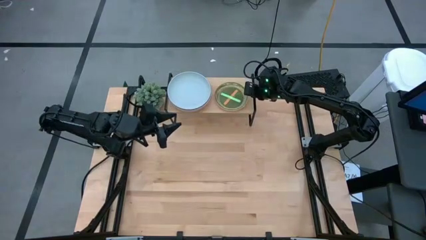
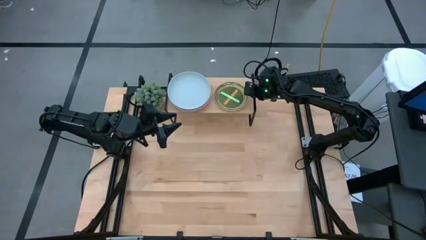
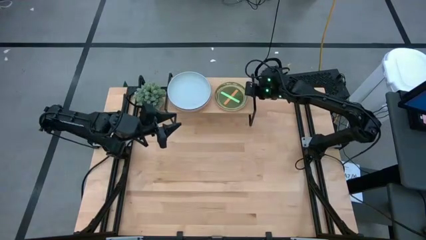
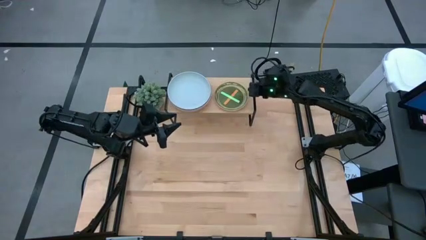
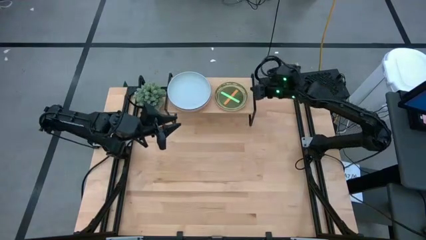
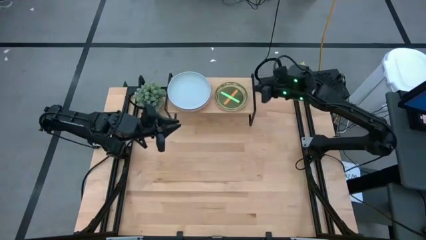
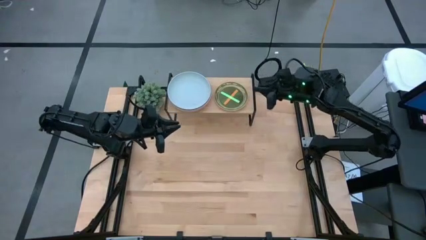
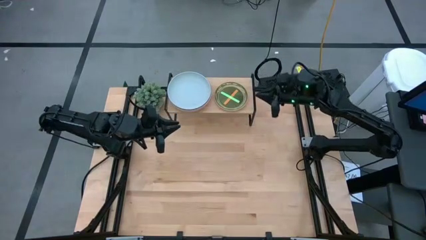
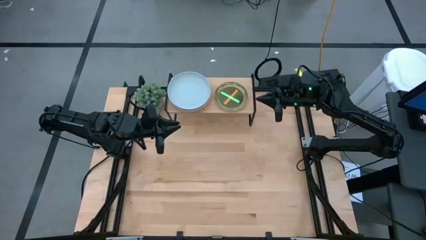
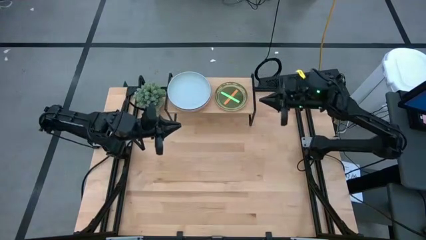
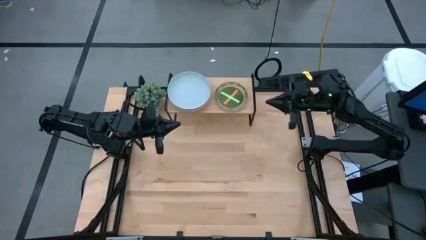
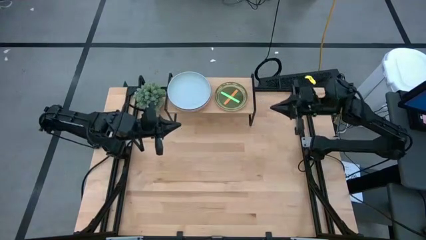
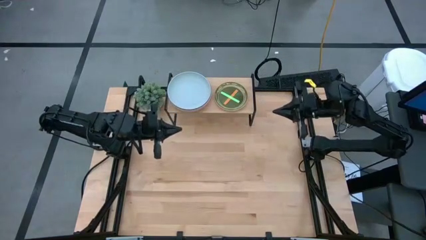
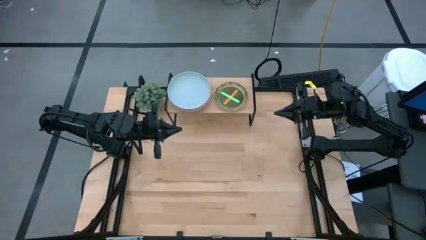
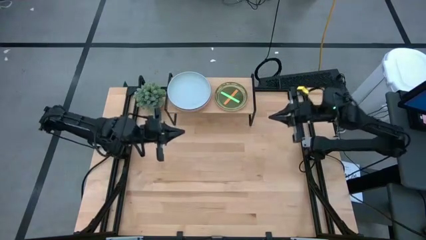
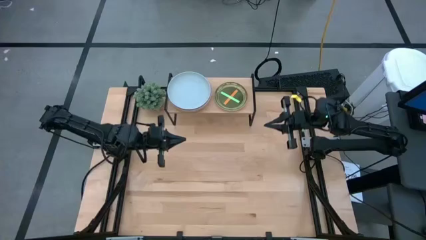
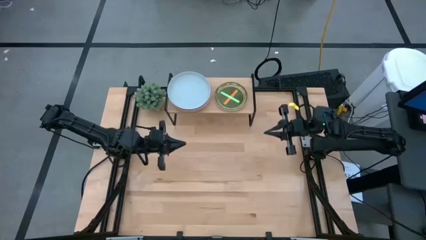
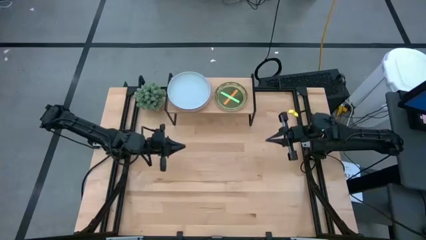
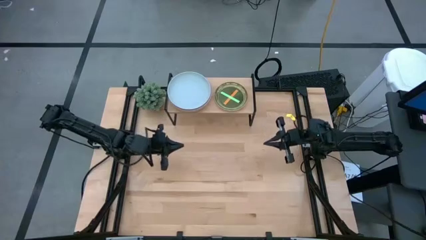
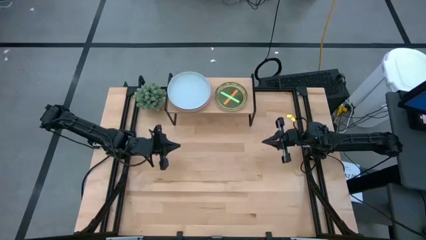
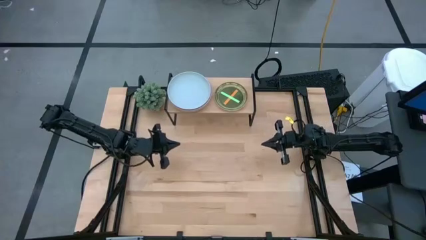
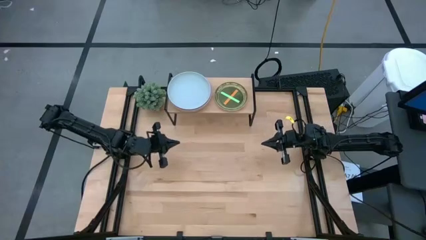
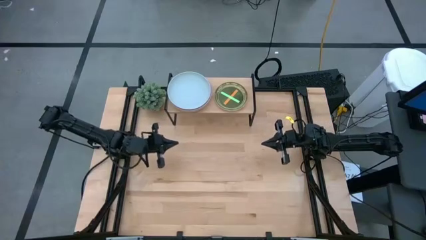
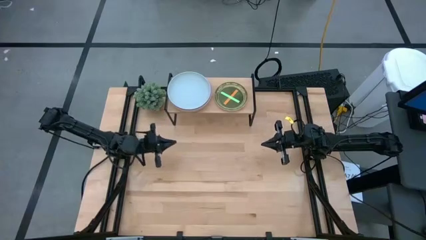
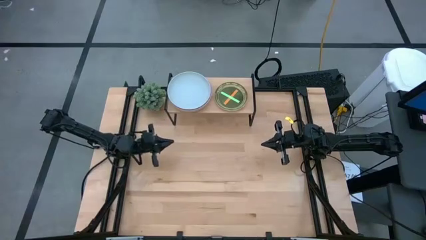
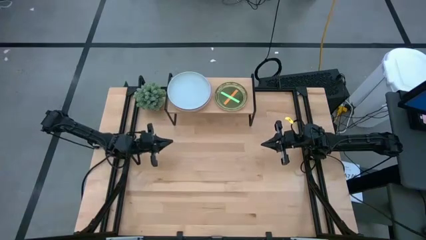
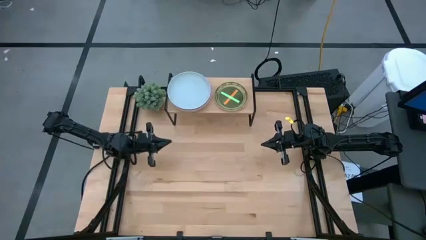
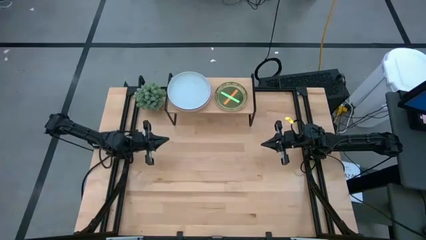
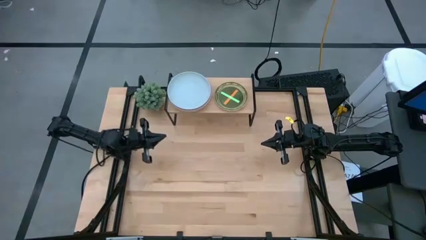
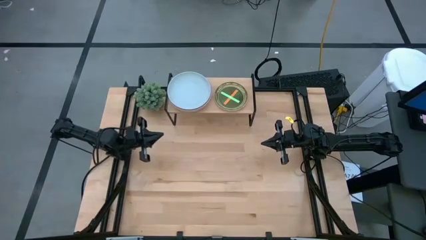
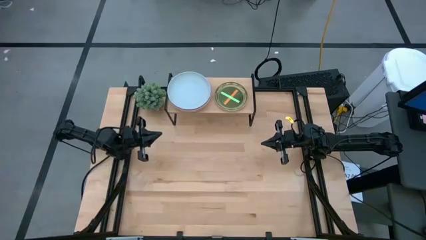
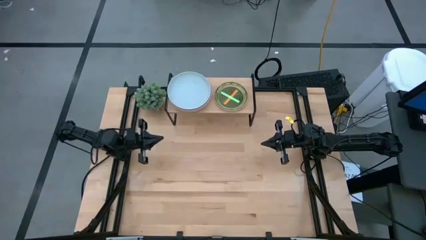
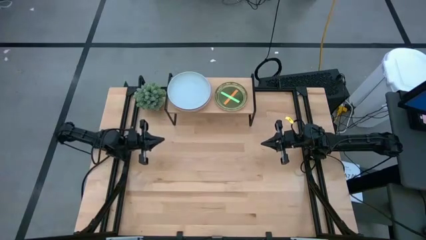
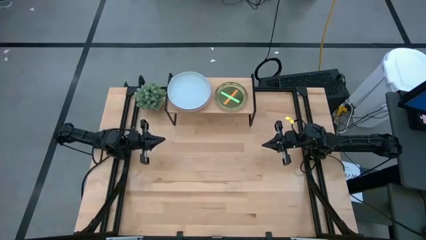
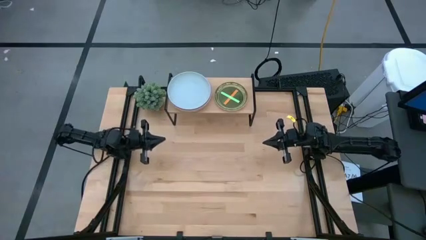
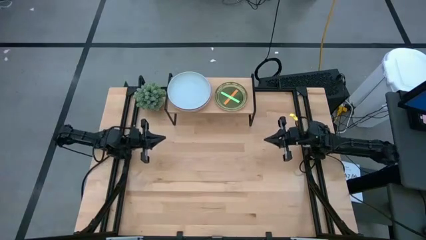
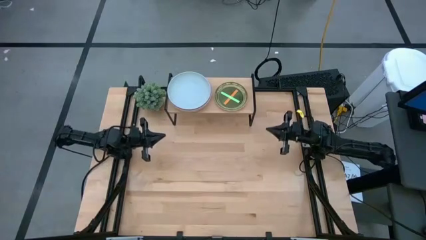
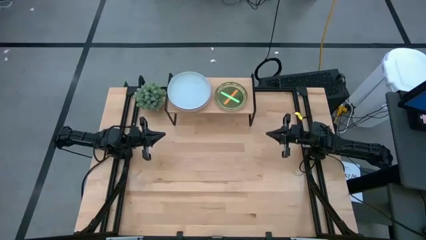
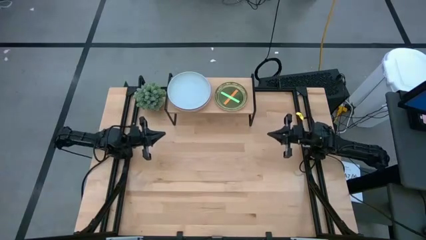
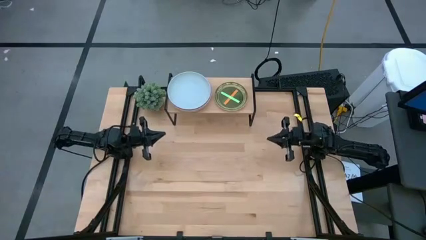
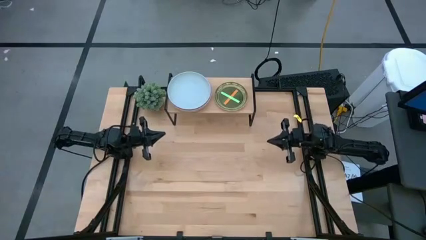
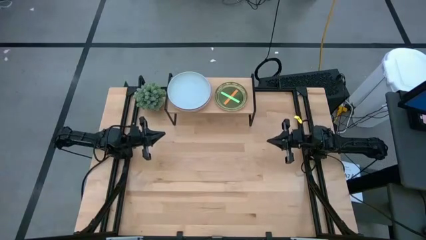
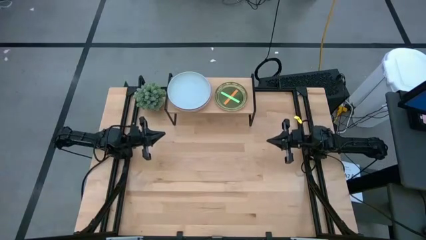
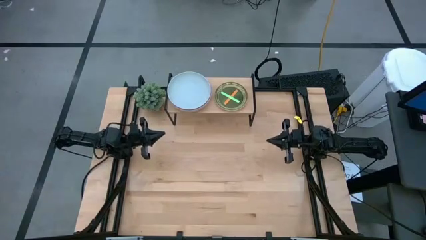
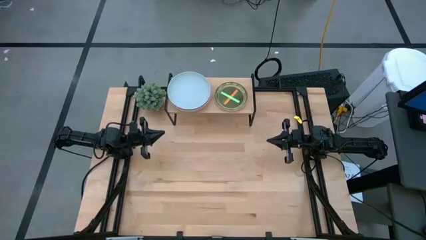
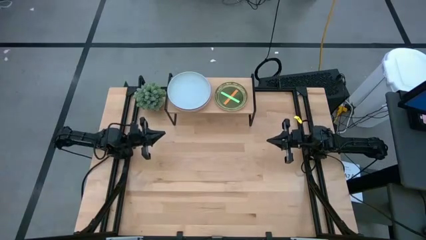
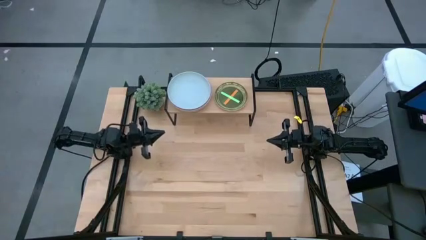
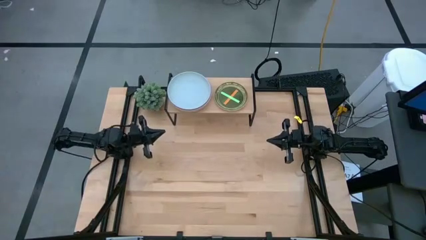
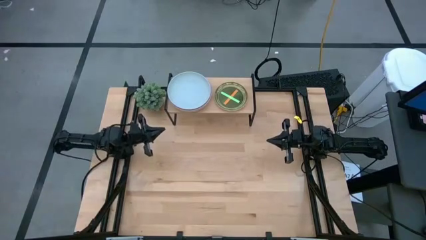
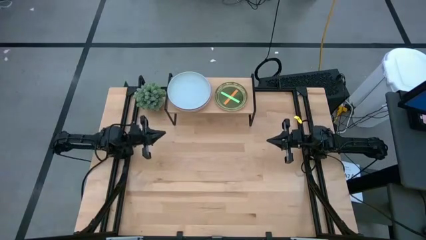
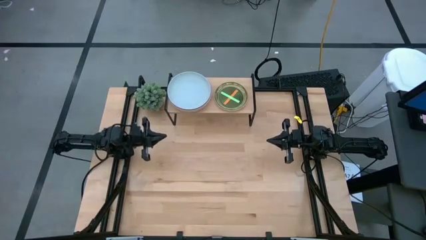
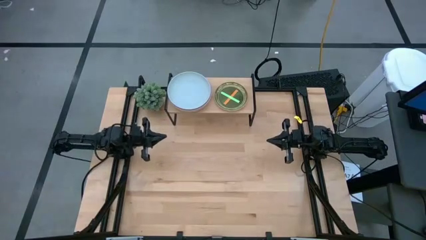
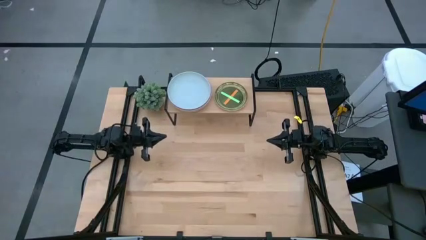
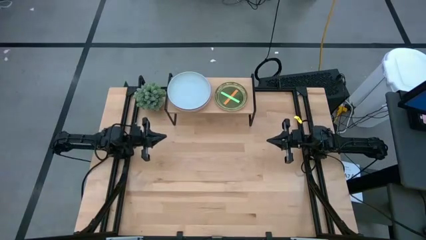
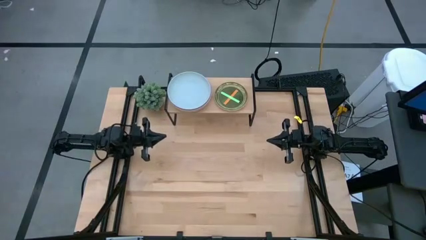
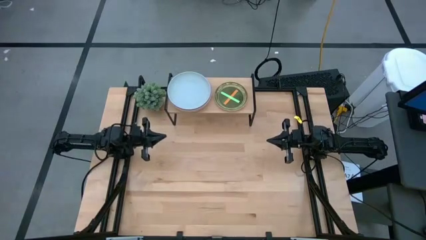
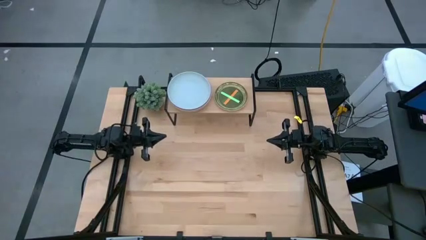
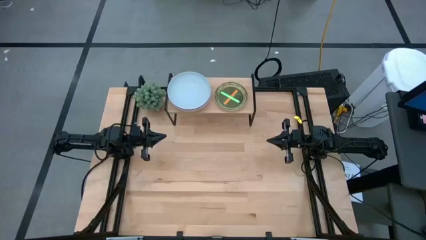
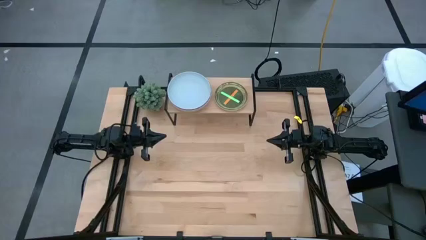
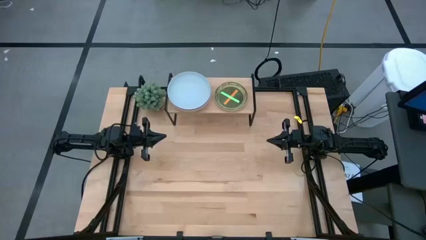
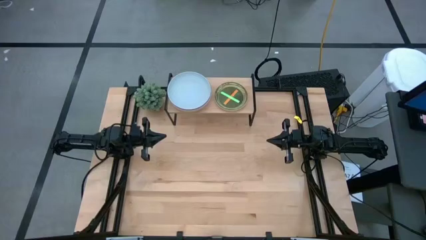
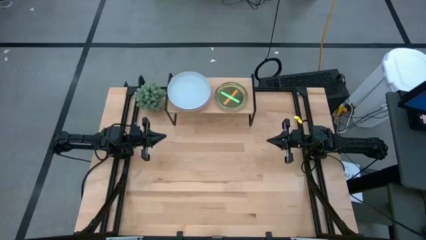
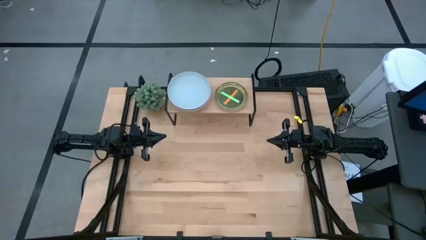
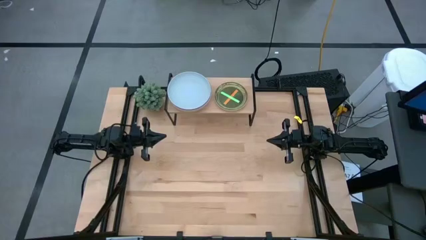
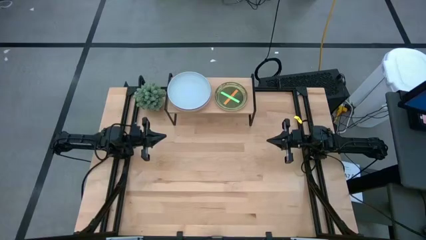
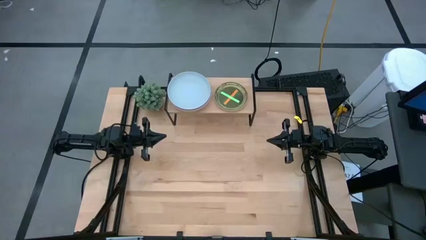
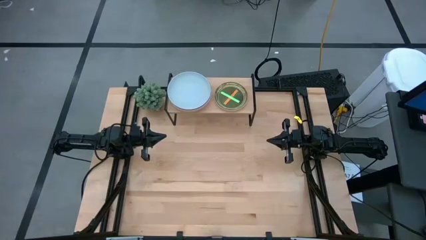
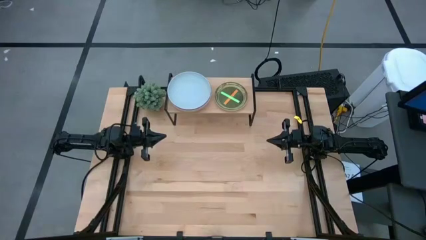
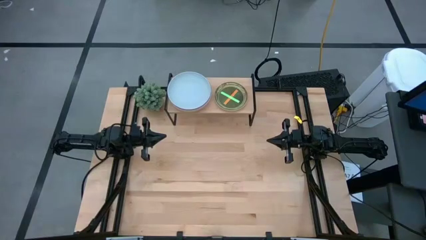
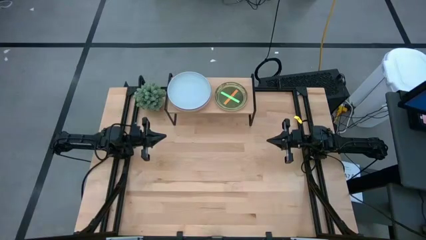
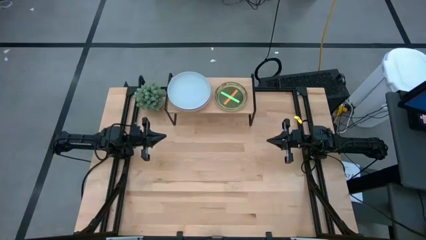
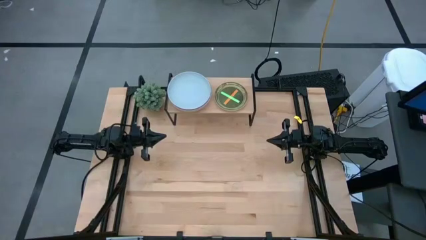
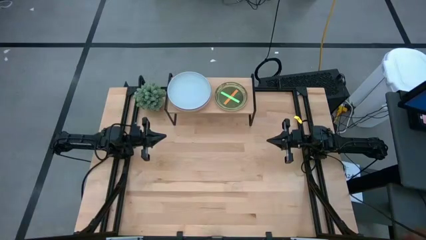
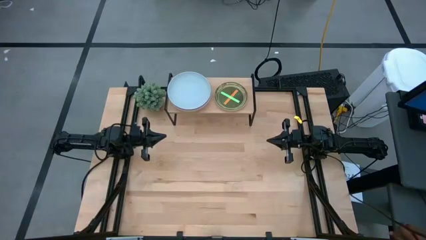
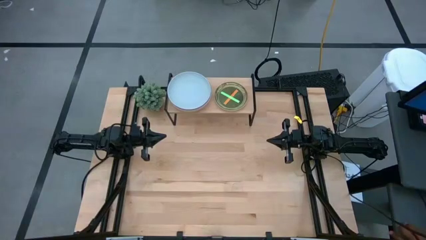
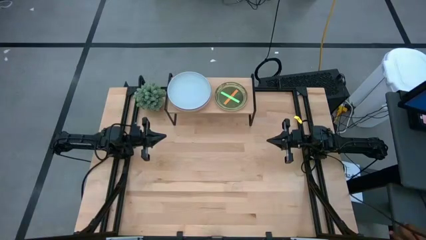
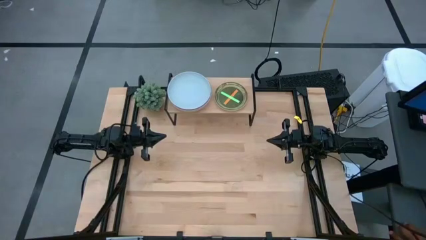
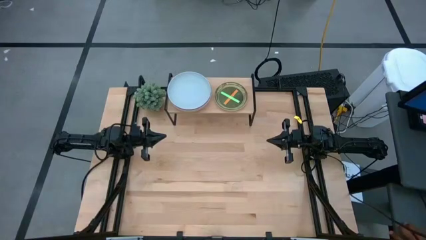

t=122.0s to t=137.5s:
Task: Place and stack plates onto a shelf
Return to Home Position

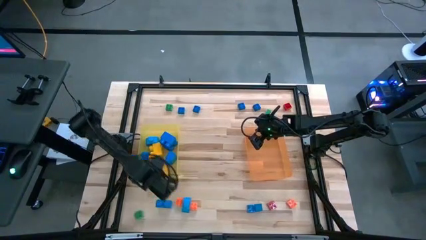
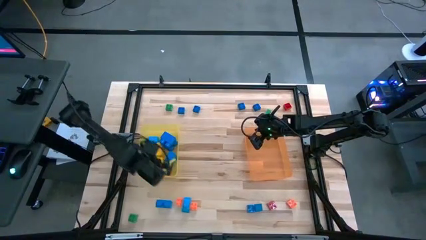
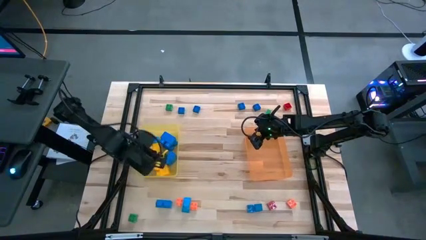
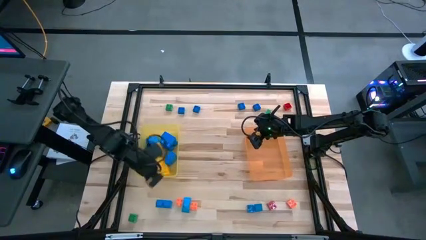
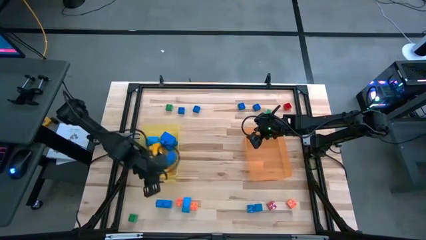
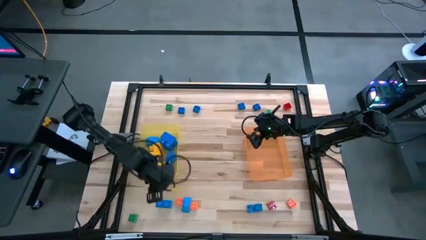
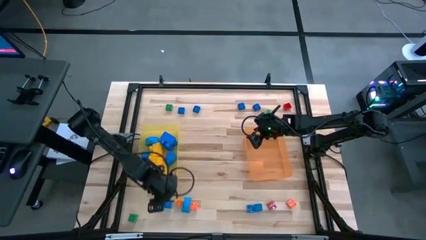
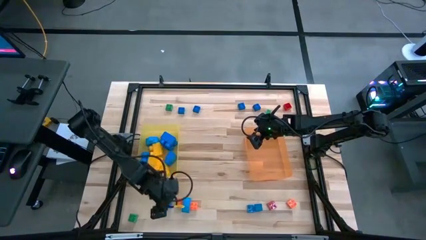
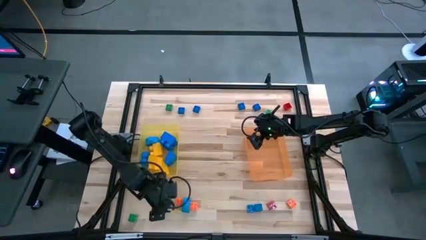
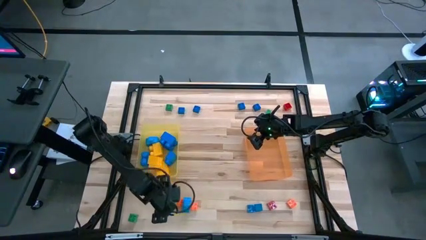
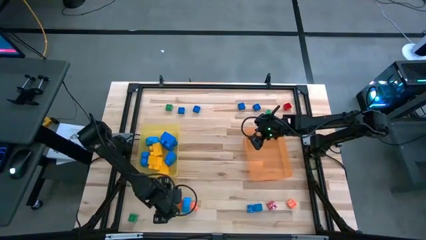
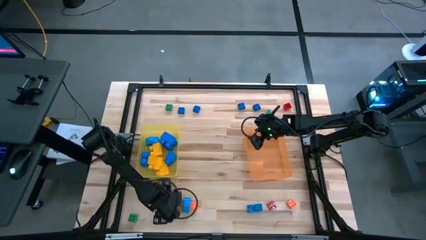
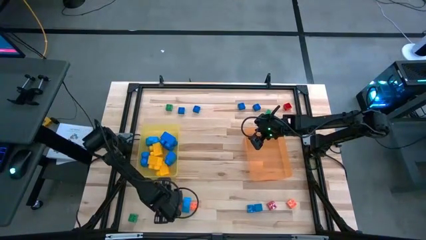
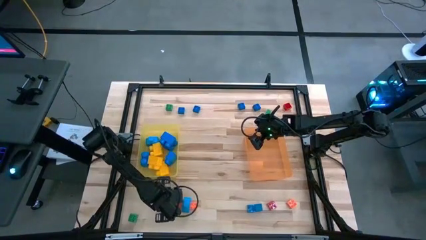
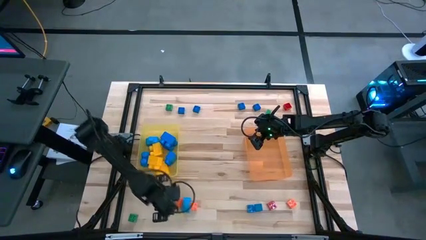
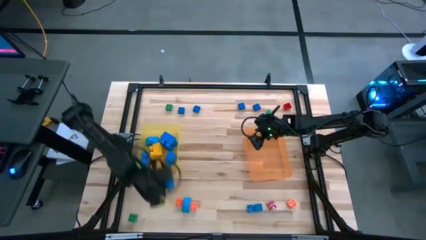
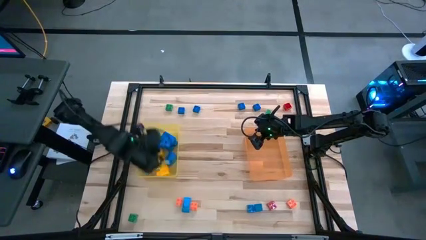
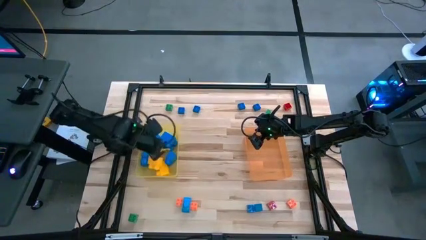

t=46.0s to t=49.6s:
Task: Sort blocks by size
Put the large blue game piece into the yellow bin
